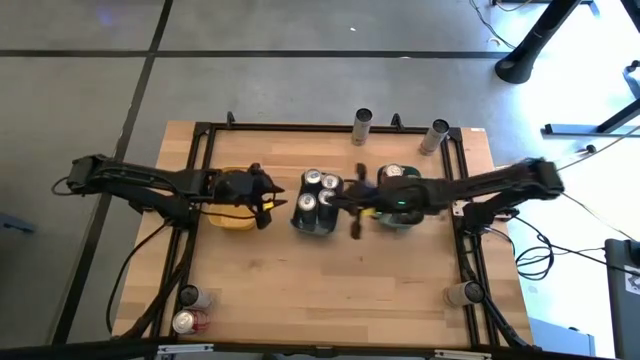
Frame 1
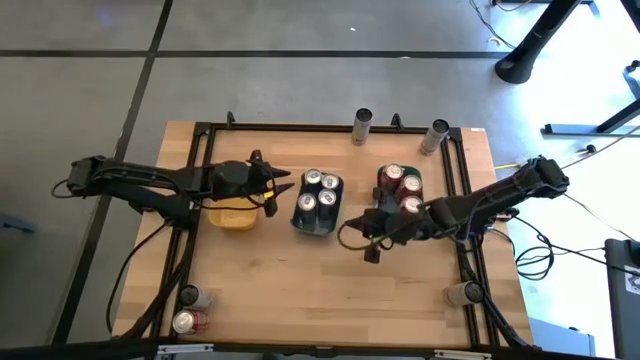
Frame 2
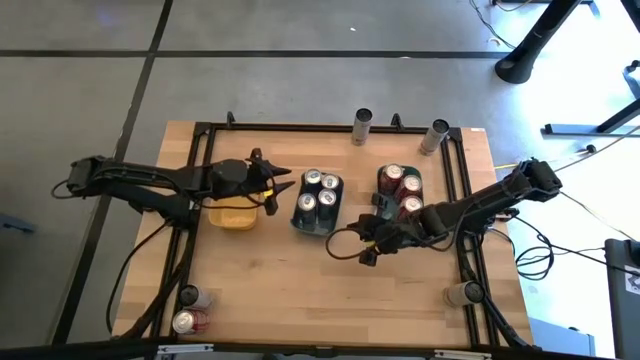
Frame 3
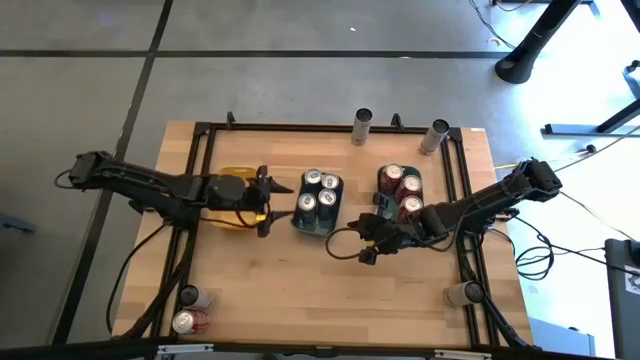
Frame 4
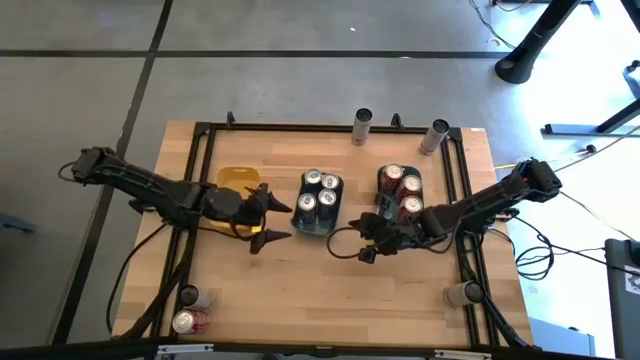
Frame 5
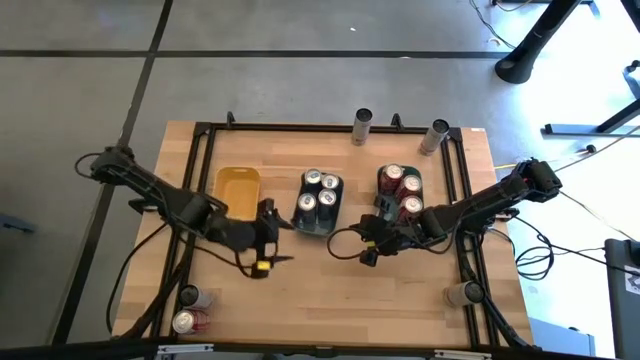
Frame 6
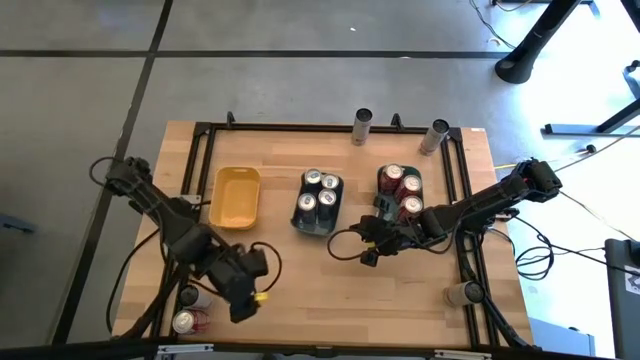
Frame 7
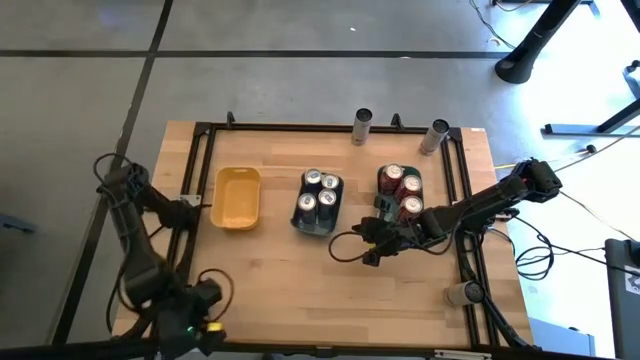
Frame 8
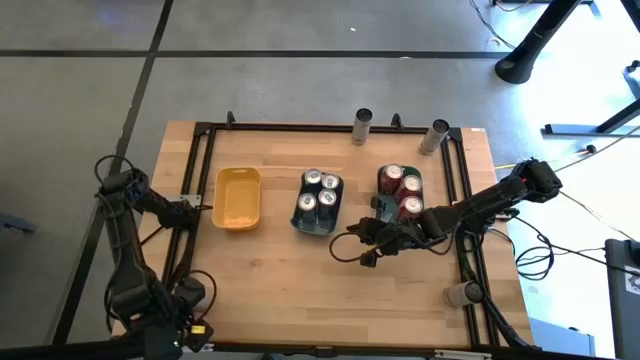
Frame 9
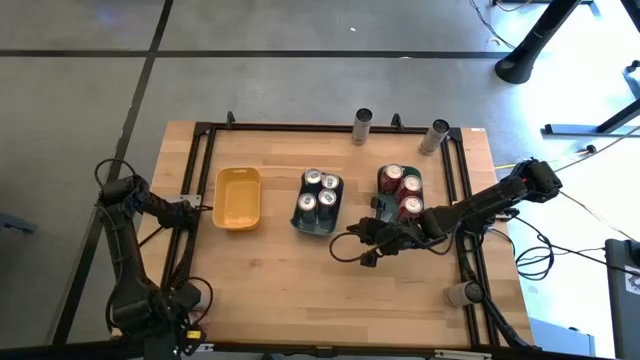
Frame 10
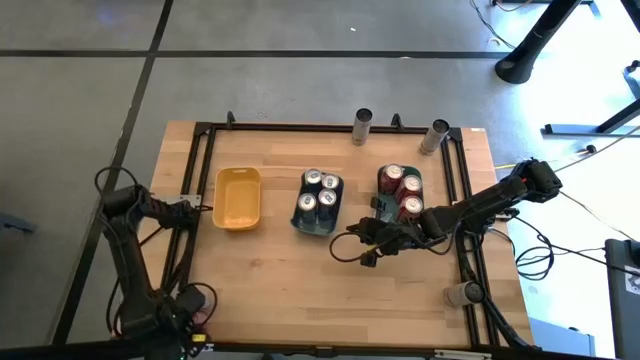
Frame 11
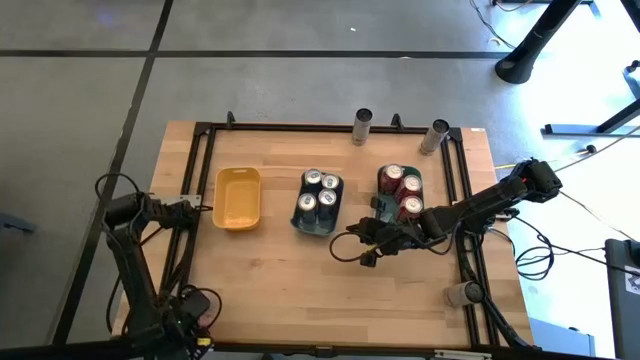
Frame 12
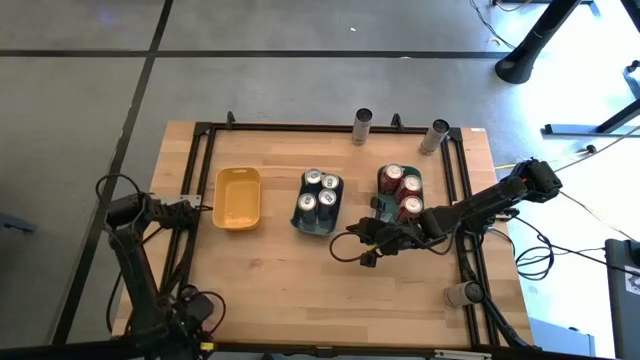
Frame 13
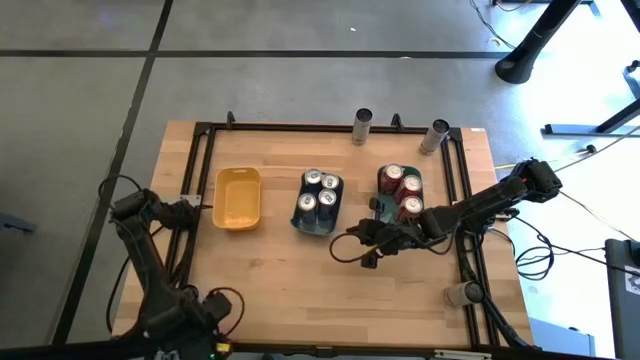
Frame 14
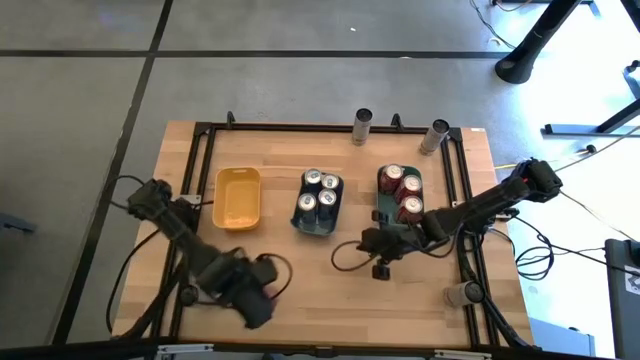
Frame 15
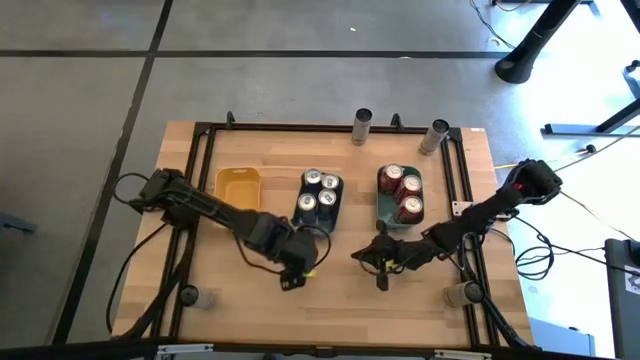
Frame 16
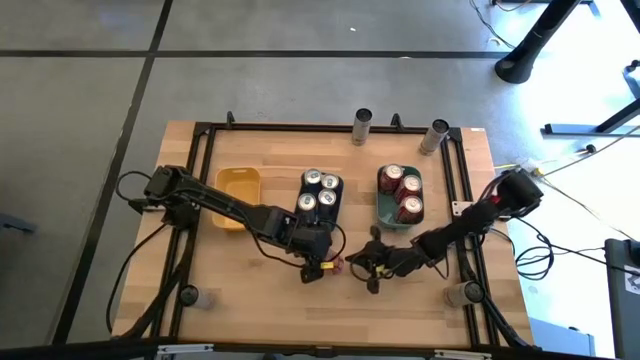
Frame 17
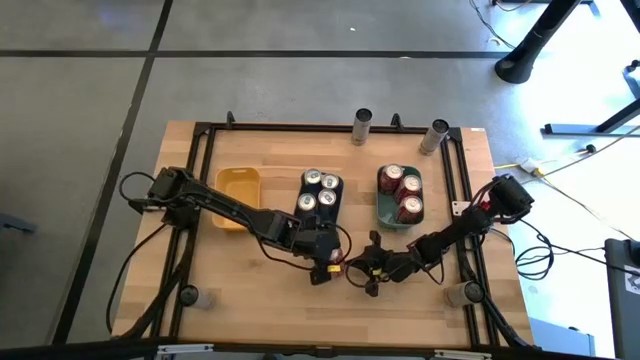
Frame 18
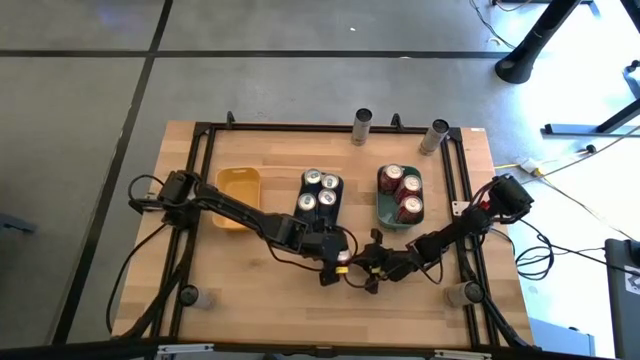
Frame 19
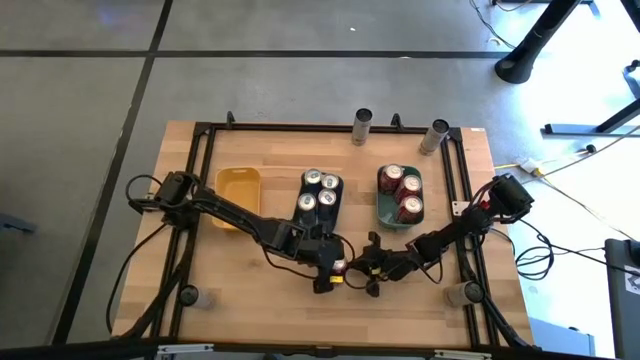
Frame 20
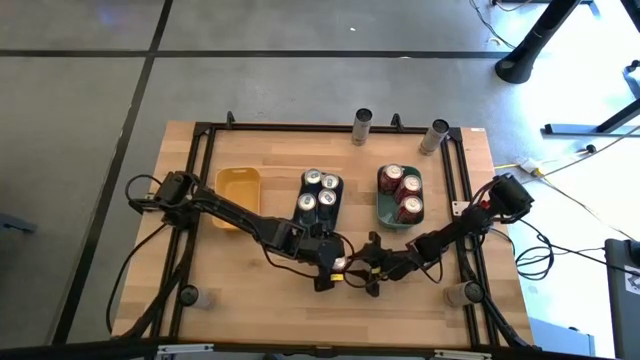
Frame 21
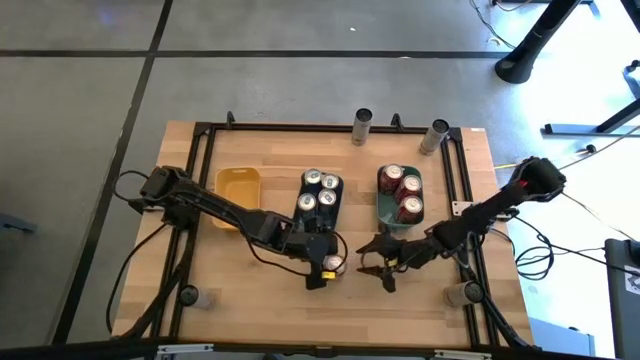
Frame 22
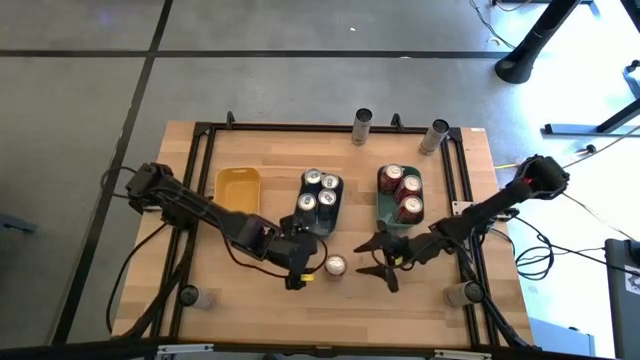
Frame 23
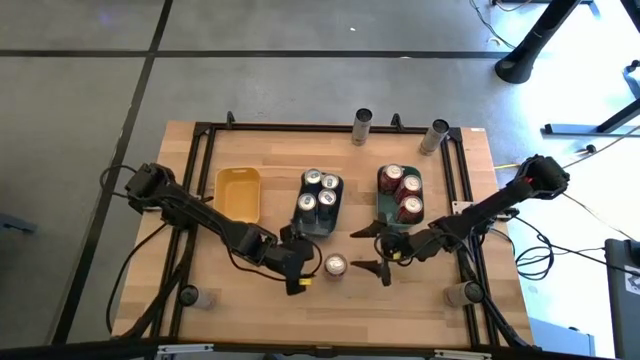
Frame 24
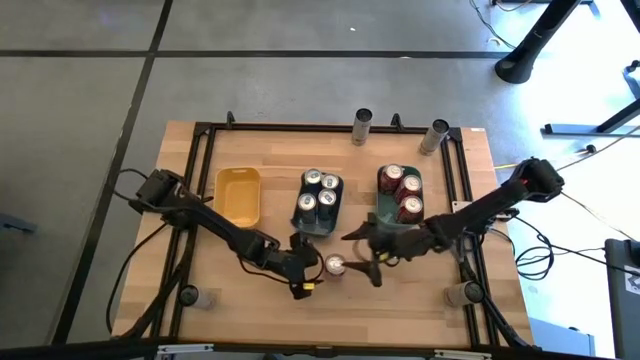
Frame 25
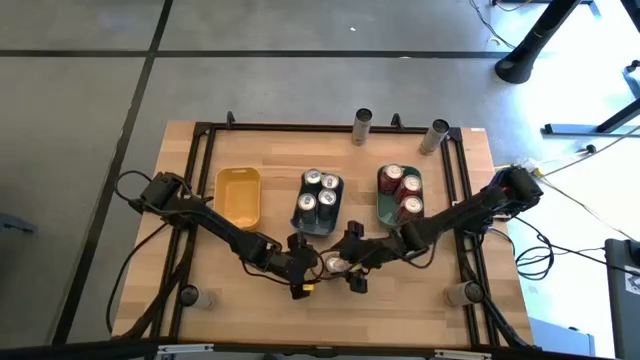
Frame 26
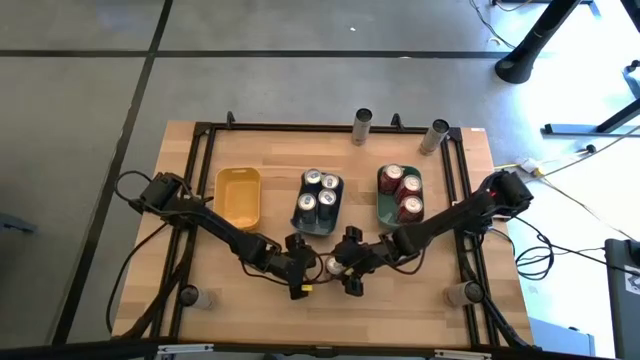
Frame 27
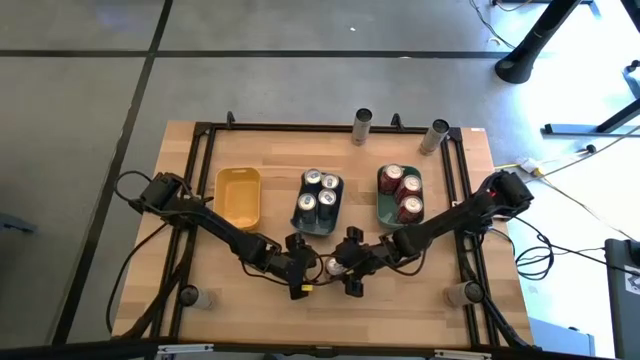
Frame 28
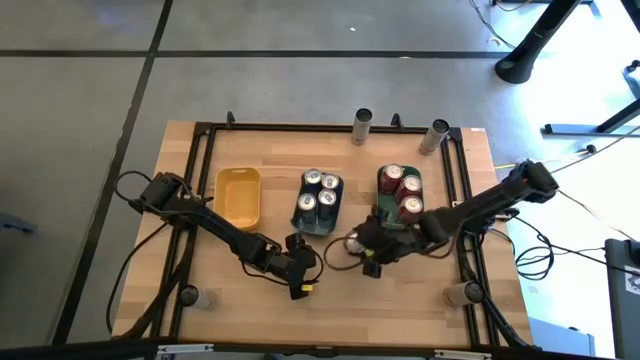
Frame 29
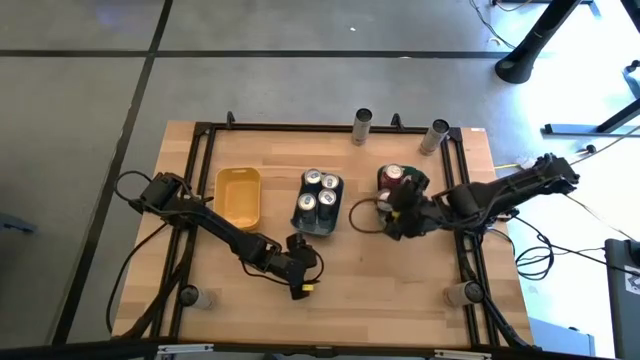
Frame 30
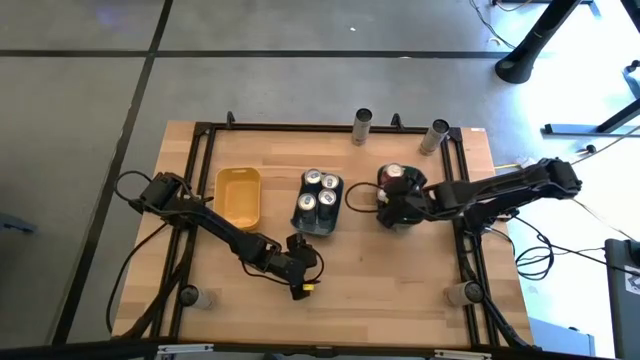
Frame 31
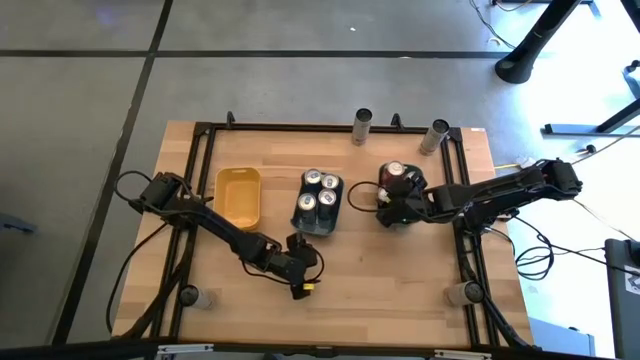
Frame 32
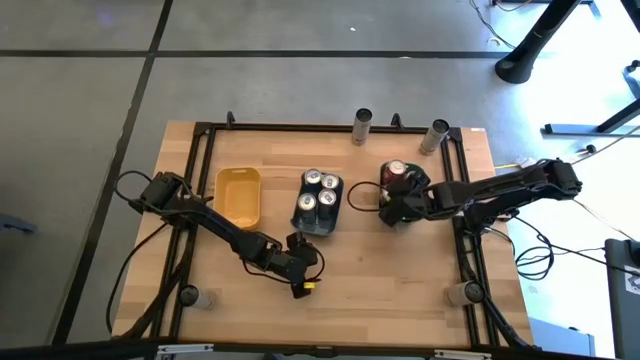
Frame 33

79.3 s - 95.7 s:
Task: Sort soda cans
Put the red soda can into green bin

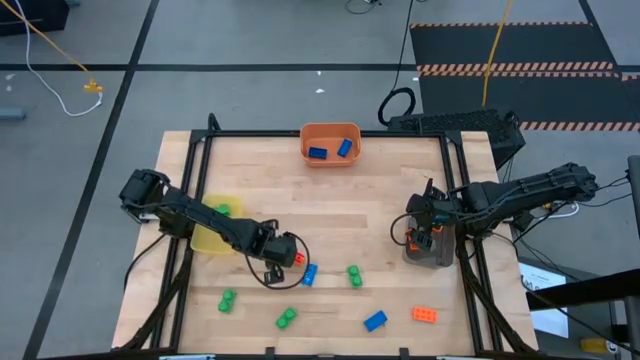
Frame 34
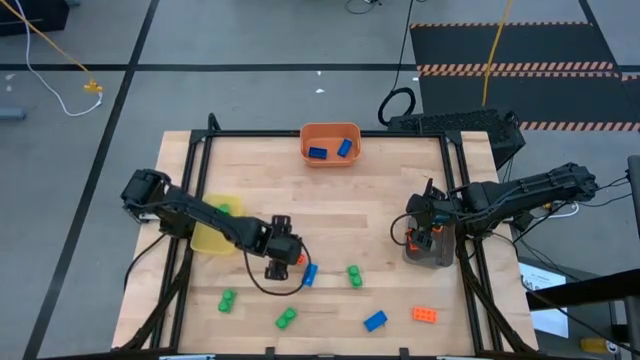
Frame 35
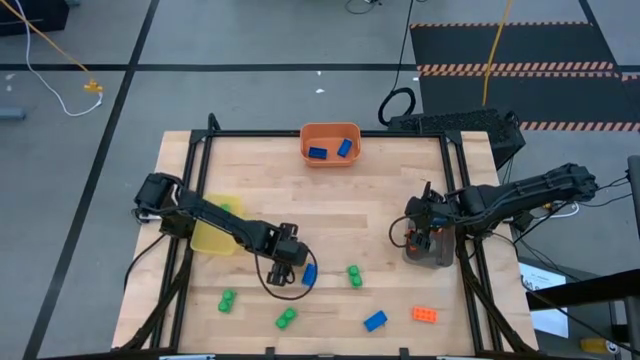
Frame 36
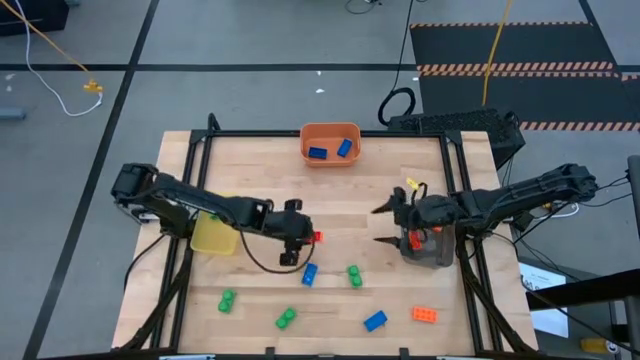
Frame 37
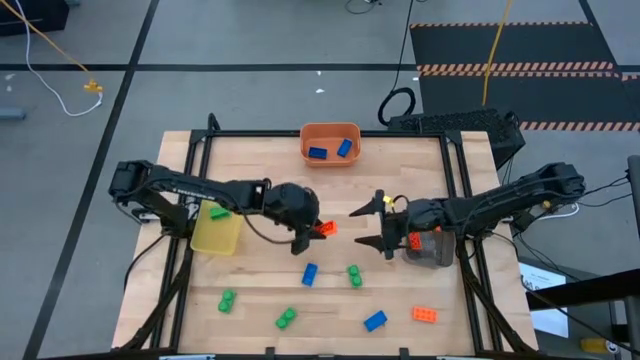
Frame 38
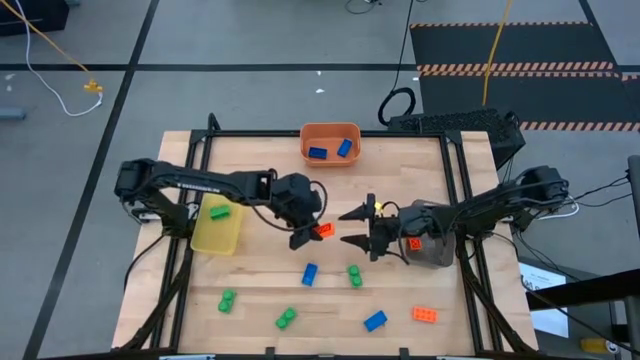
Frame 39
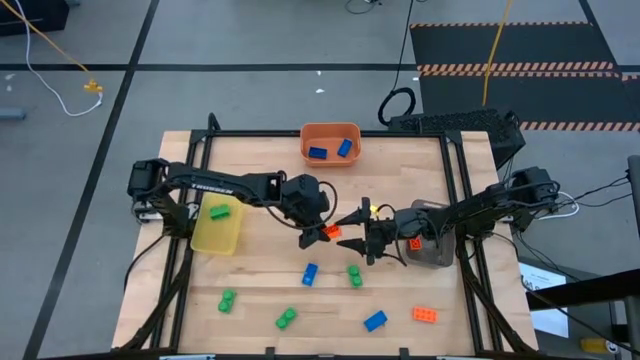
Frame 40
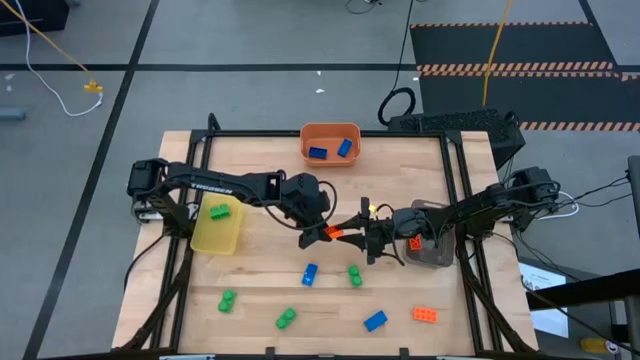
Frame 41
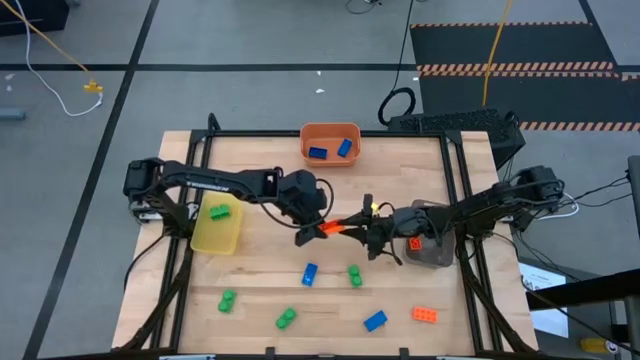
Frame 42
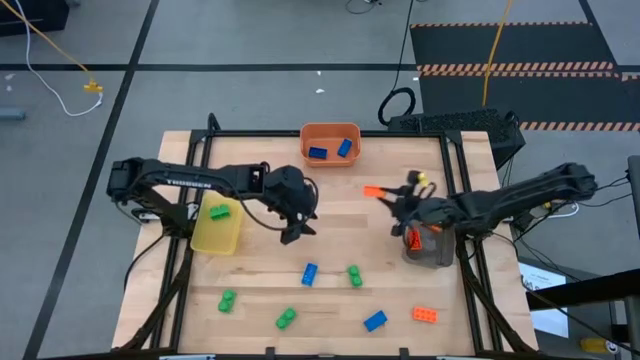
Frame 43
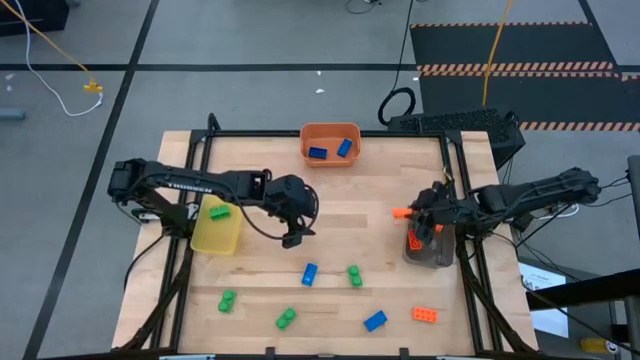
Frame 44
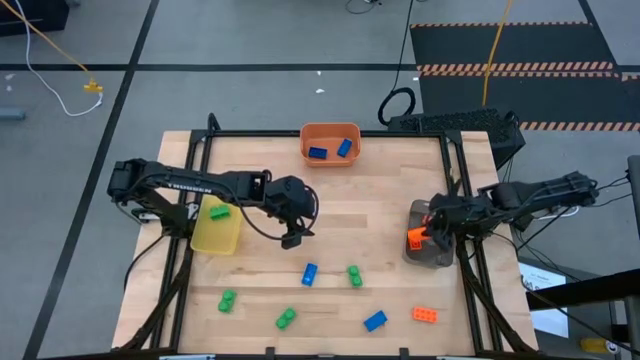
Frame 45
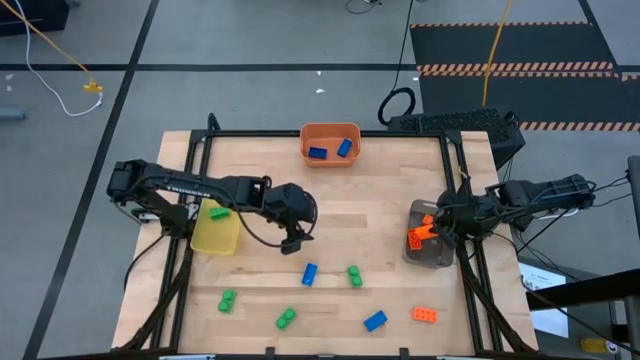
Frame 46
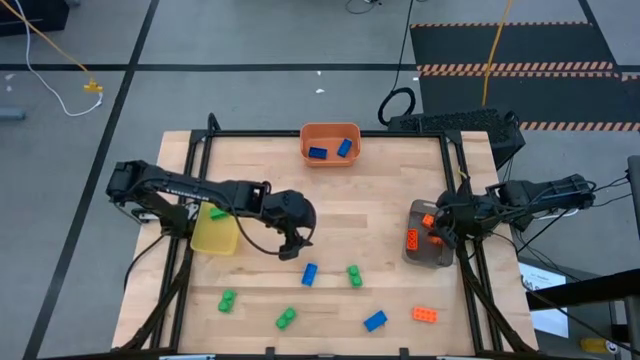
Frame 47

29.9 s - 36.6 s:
Task: Sort & place blocks by color
Put the orange game piece into the black bin
